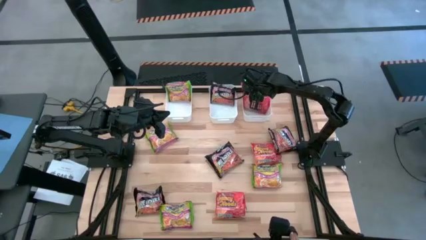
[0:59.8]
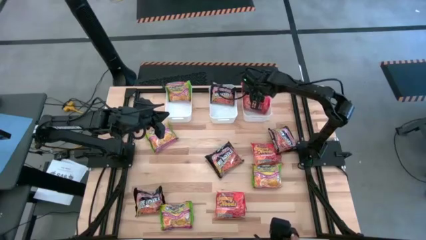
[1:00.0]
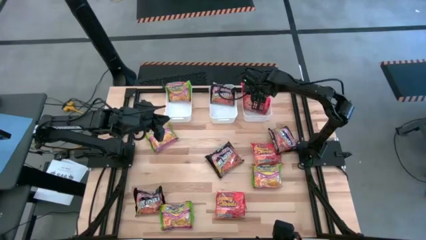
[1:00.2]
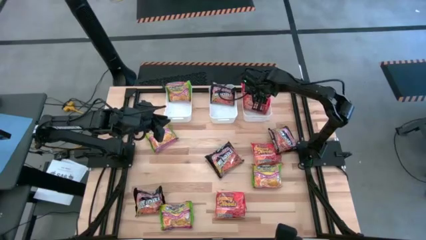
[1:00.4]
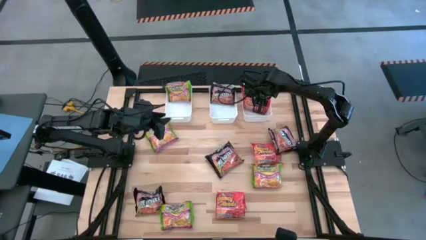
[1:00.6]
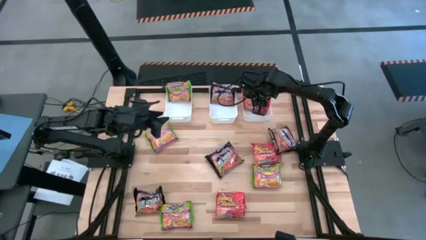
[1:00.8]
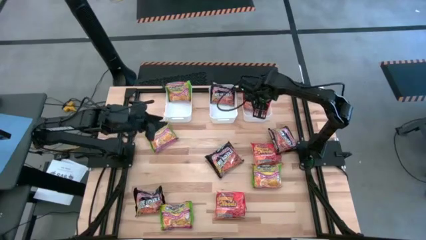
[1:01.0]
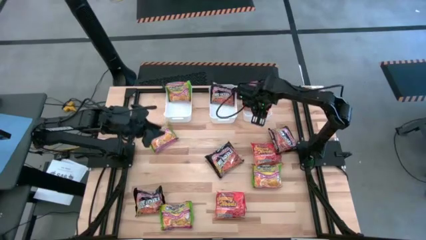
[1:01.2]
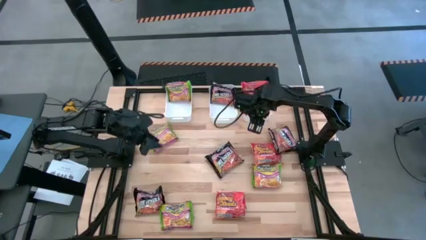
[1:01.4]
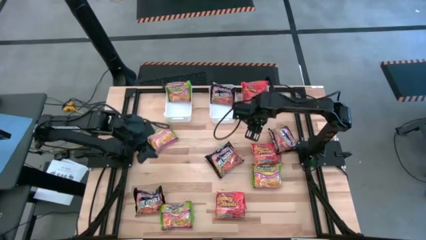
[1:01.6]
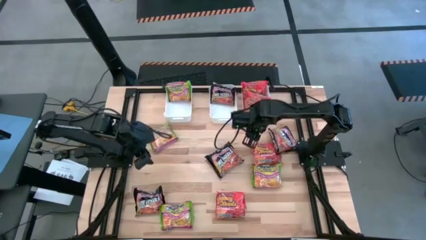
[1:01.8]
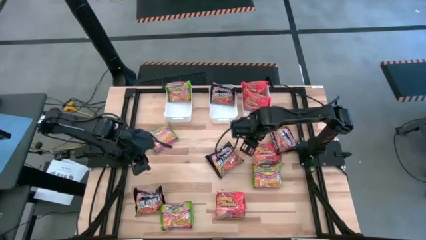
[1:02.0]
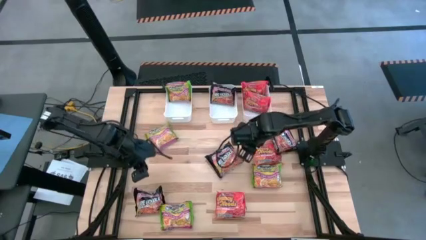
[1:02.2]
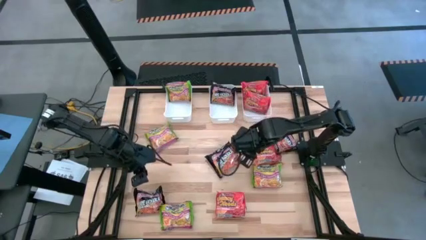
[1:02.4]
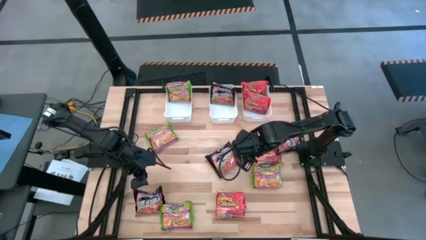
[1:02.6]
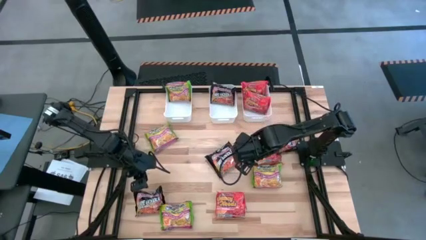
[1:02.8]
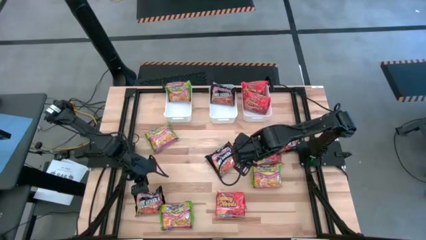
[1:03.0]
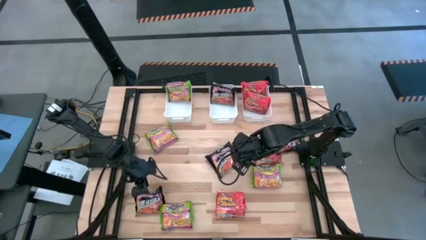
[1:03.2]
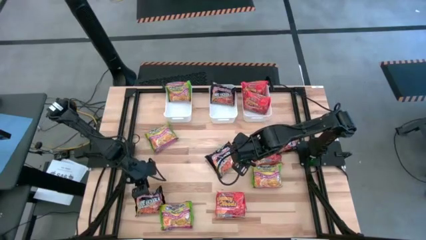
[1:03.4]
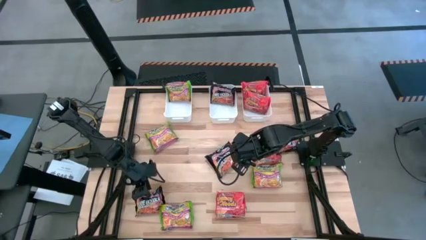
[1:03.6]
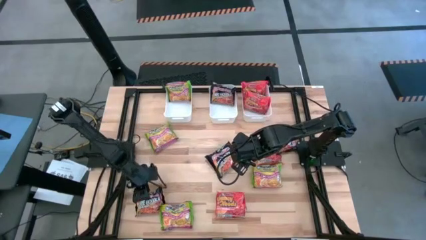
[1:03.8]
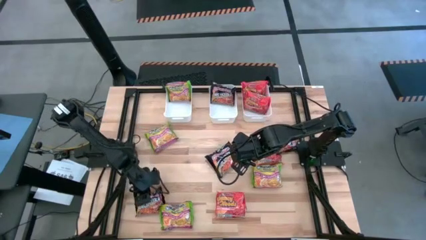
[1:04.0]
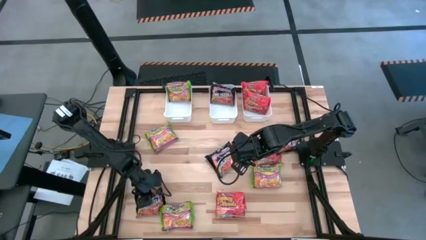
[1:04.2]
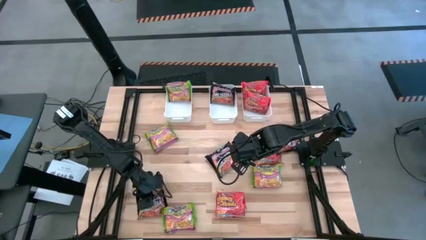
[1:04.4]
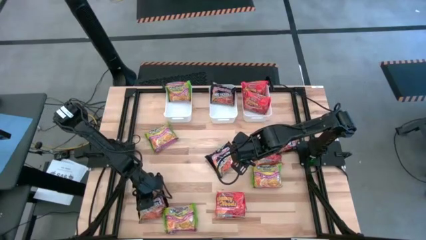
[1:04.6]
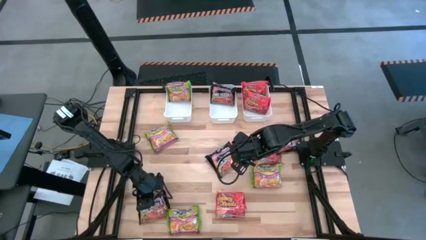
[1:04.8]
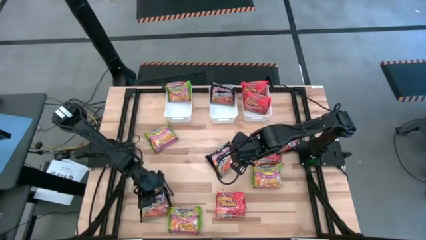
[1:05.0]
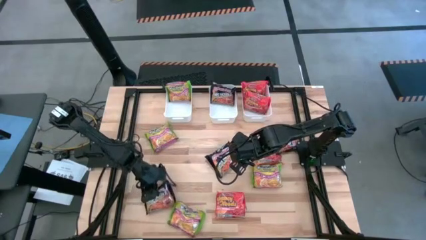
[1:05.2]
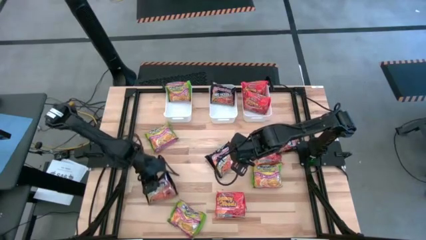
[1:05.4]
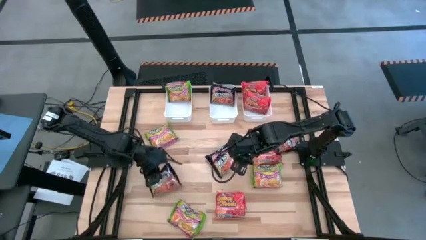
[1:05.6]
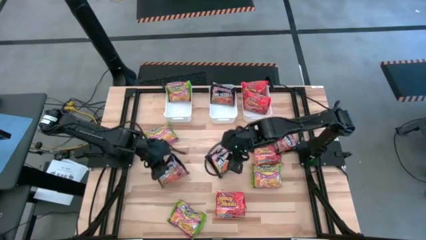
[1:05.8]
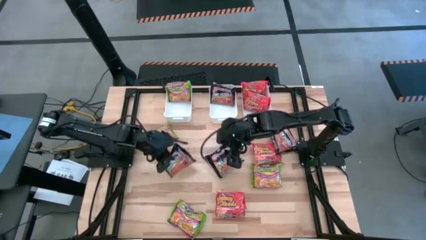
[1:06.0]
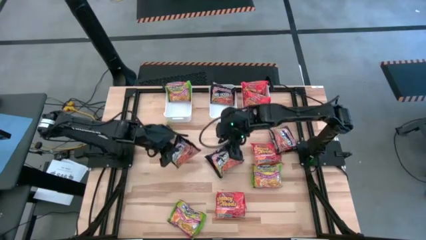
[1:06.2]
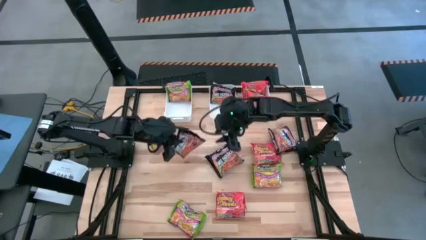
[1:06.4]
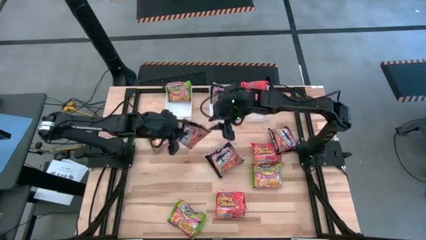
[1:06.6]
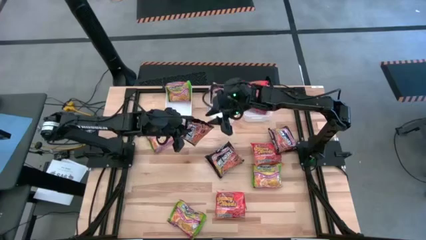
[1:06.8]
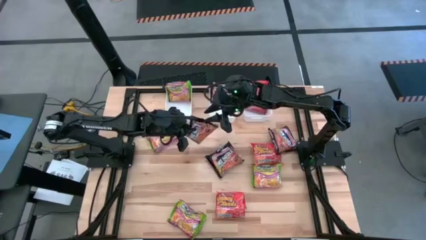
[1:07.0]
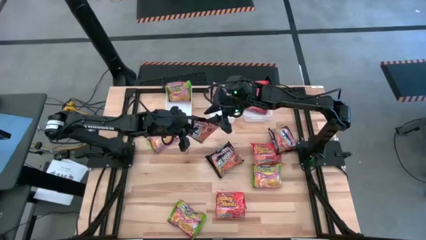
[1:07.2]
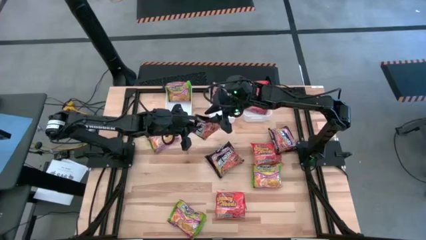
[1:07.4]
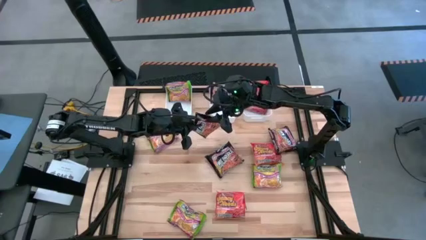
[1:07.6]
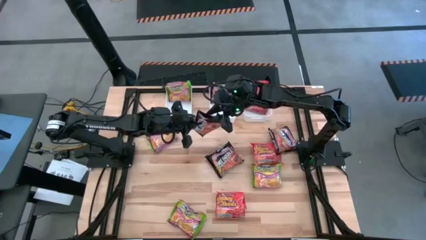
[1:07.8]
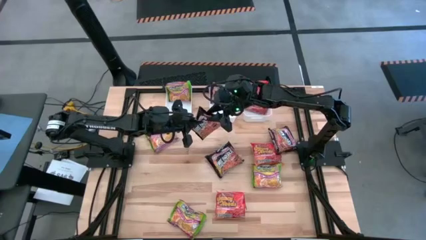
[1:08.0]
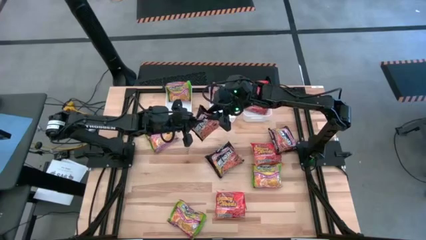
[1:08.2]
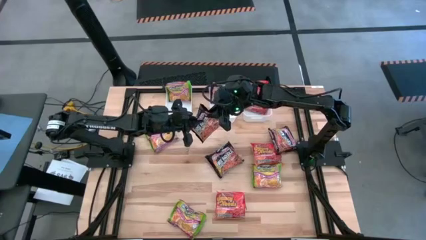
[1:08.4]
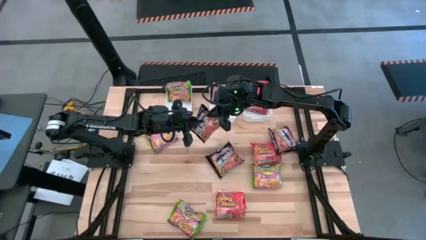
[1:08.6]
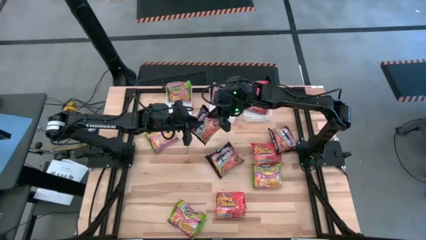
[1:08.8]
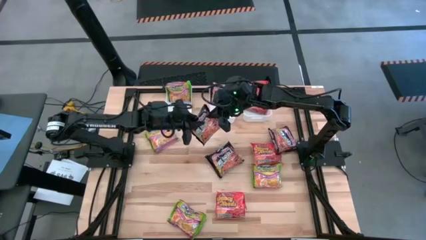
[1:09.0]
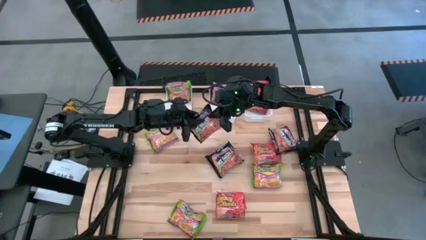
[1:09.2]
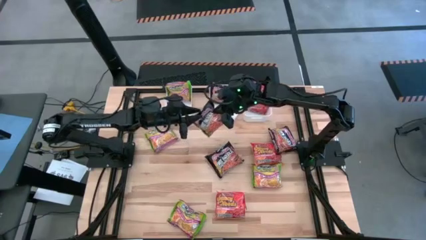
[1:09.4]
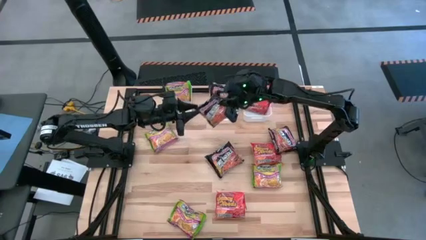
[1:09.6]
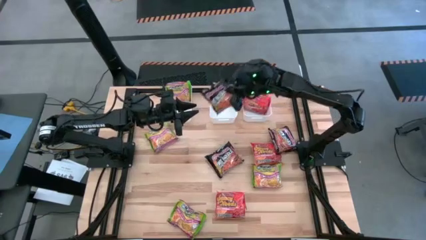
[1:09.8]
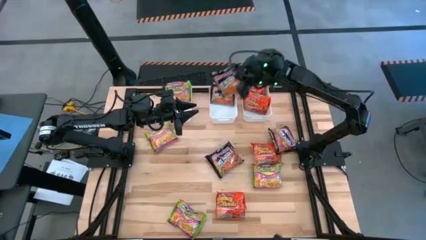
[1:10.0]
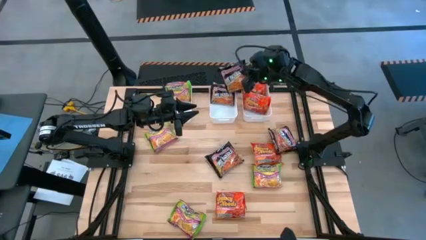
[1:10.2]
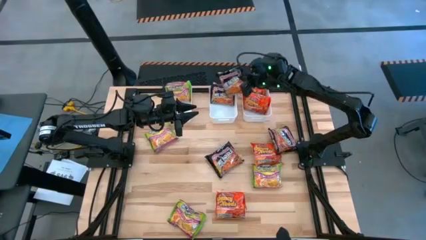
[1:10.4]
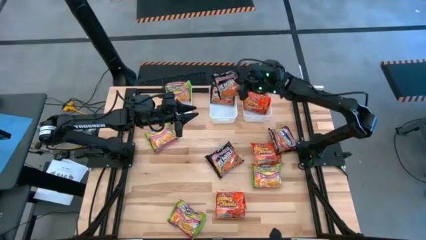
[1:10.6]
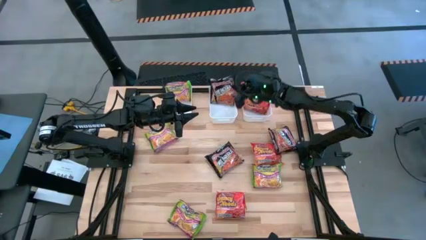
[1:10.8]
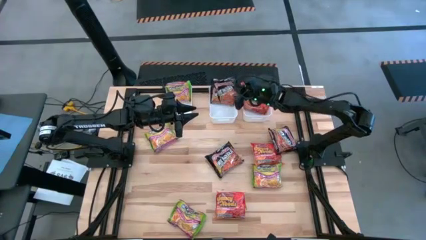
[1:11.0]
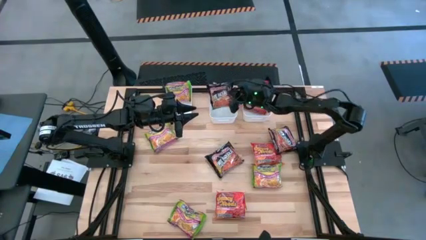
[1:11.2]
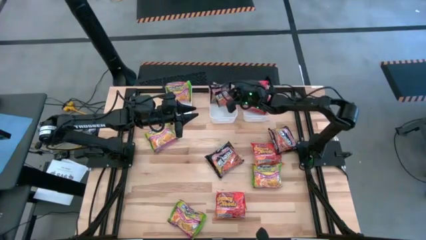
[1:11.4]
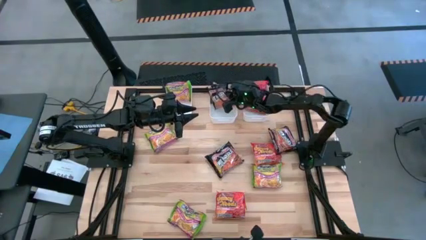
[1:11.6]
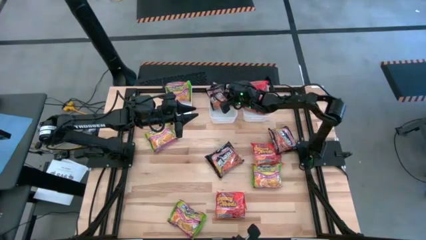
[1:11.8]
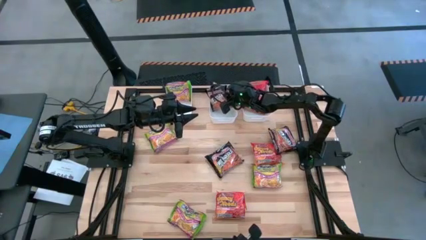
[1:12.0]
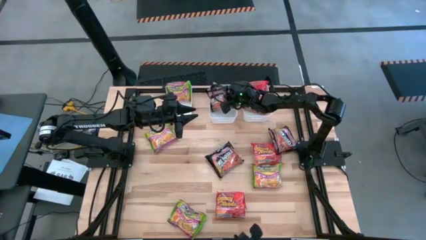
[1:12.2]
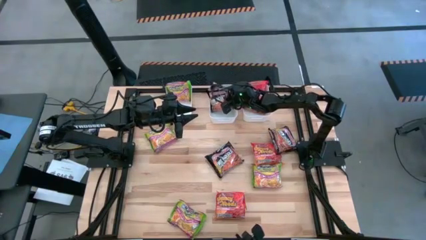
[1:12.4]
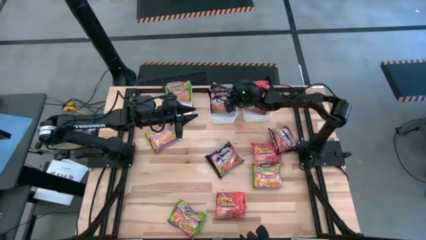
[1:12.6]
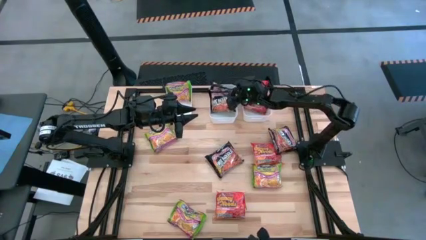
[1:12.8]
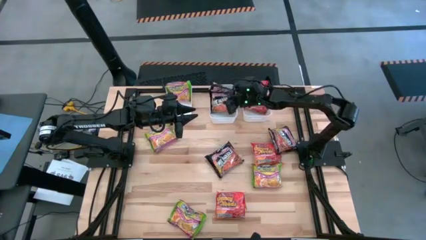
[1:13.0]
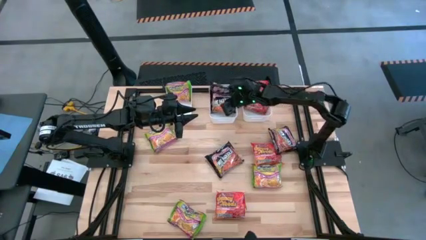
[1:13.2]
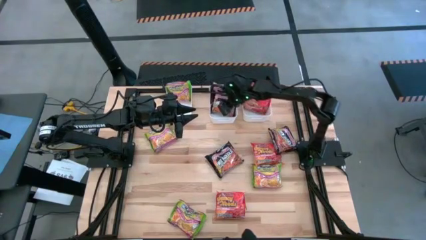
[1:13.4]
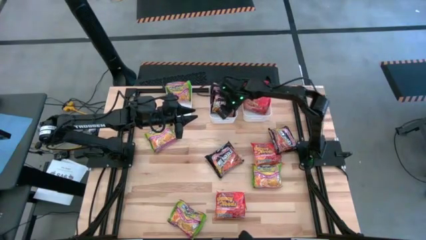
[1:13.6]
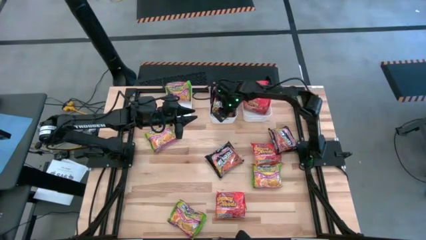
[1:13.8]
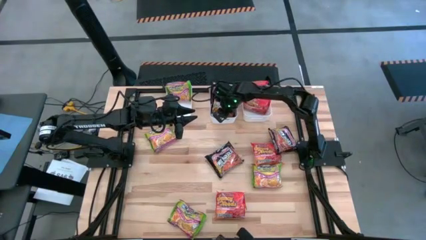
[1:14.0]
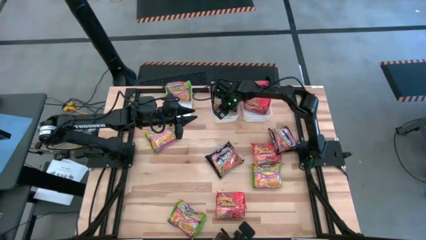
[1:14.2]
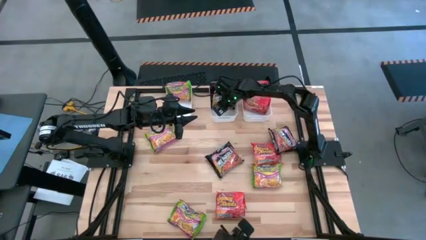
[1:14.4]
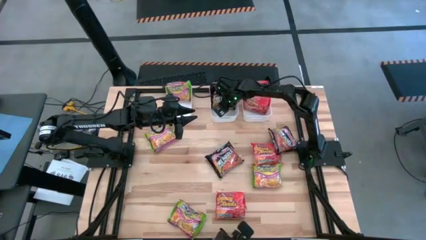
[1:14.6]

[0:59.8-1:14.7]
Task: Sort Maruchan noodles
Put the black noodle pack into the middle white bin

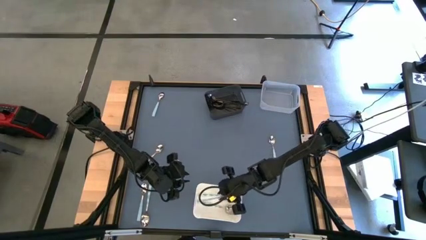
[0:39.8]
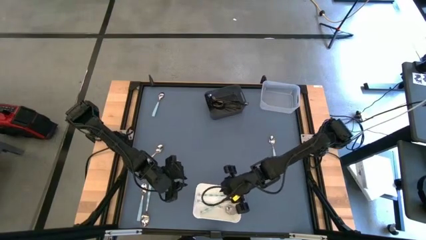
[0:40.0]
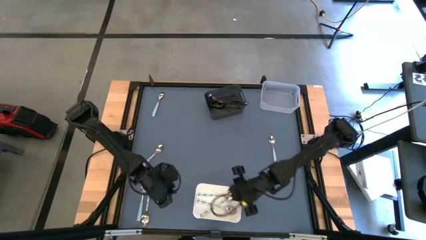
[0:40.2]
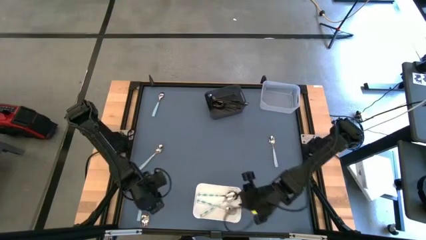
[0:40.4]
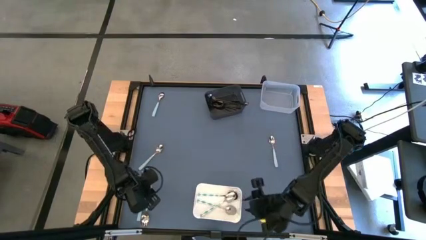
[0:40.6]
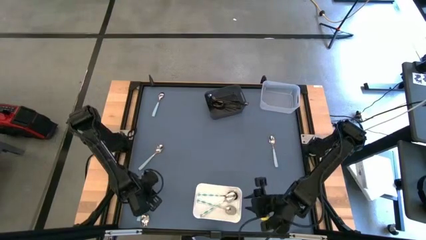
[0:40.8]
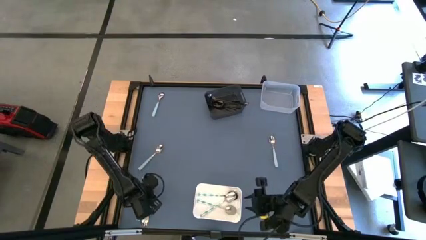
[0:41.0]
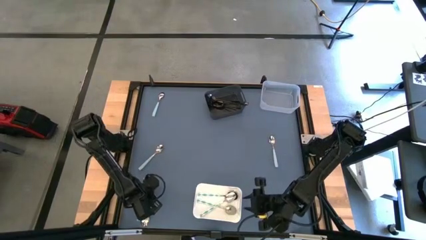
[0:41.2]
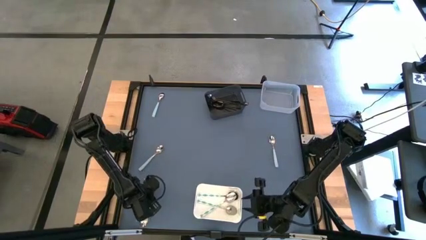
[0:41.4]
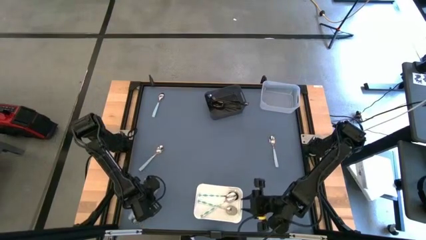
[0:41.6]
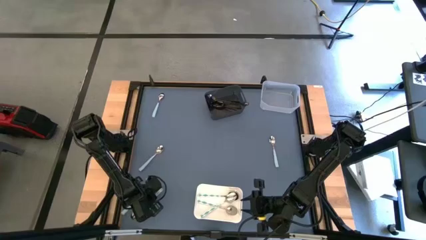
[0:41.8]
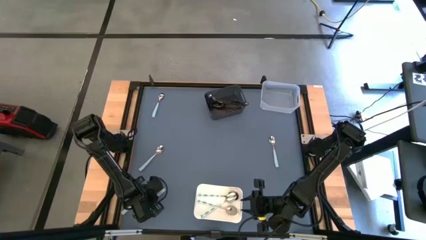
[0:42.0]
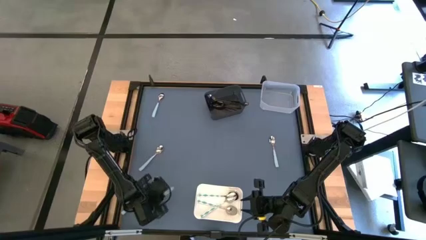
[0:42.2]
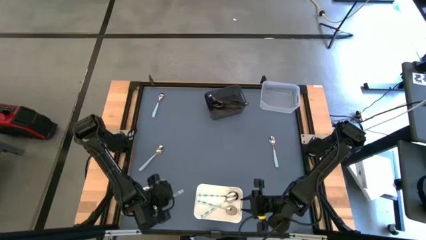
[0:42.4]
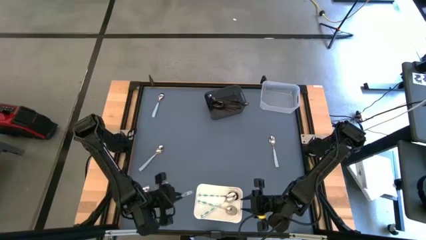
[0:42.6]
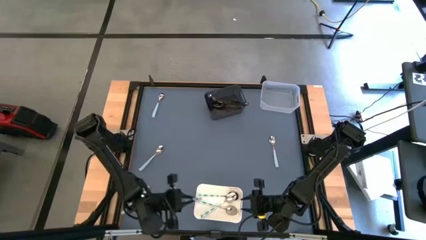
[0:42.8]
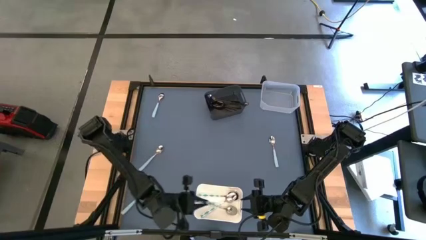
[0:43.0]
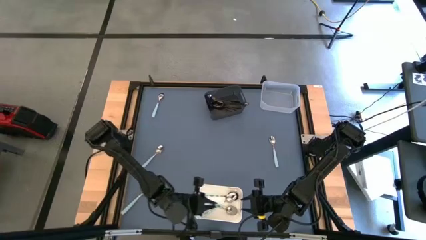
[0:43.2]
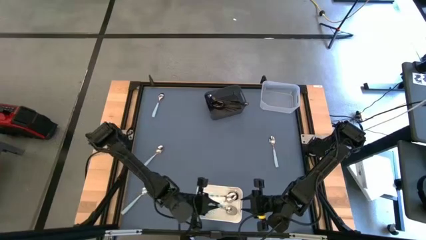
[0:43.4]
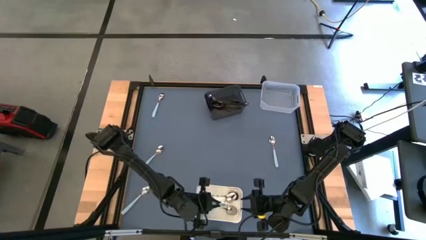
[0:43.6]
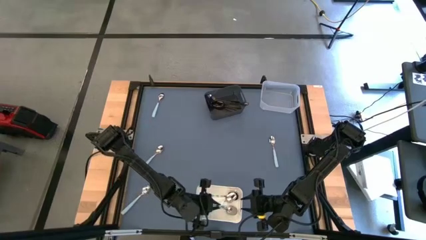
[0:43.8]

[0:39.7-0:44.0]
Task: Sort silverware by color (type)
Put the white patterned spoon into the white bin
